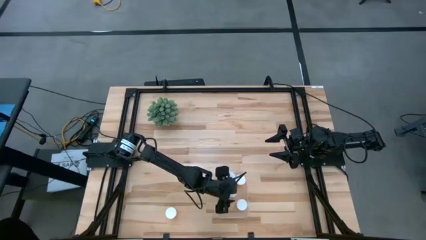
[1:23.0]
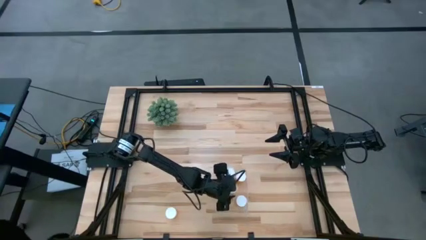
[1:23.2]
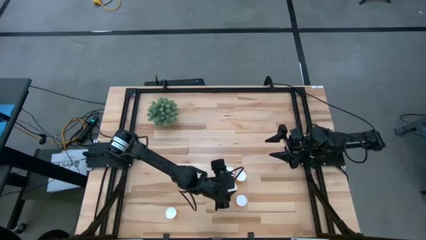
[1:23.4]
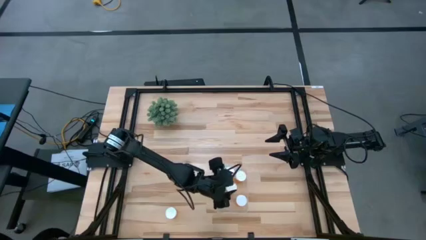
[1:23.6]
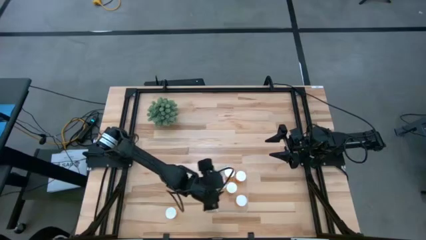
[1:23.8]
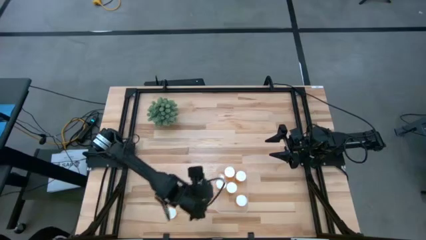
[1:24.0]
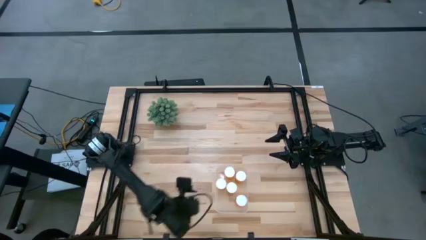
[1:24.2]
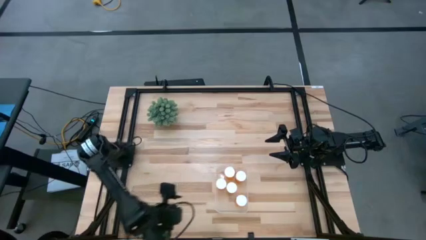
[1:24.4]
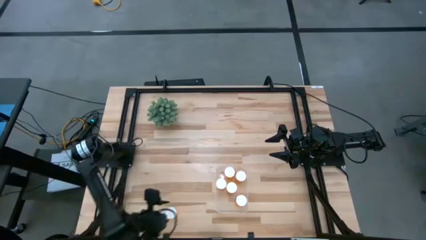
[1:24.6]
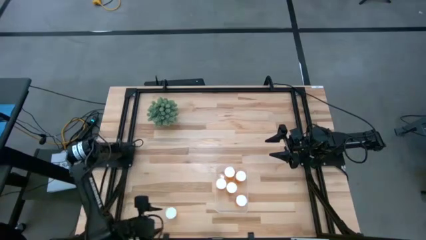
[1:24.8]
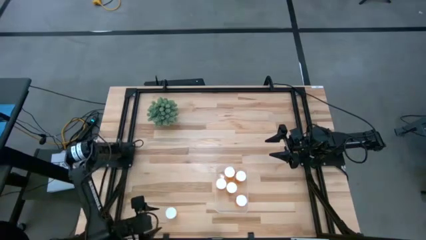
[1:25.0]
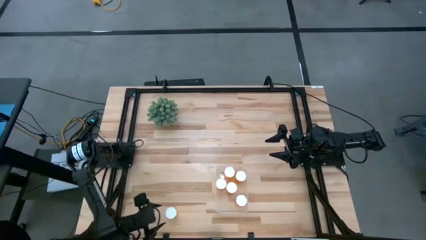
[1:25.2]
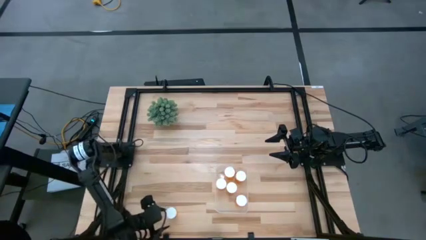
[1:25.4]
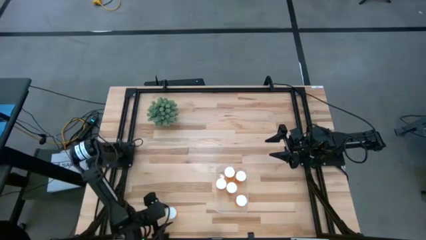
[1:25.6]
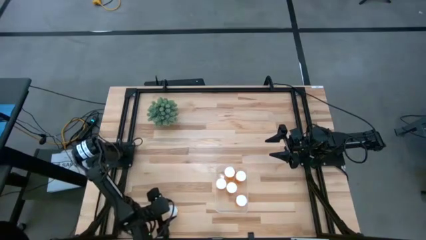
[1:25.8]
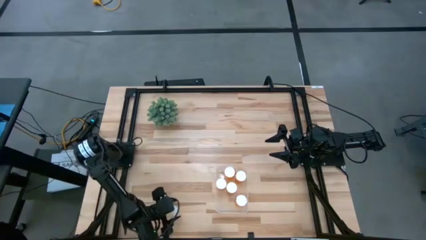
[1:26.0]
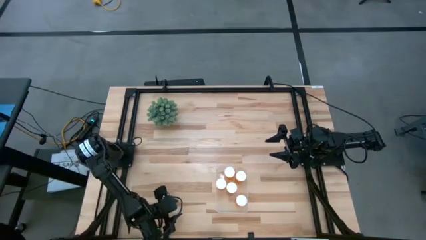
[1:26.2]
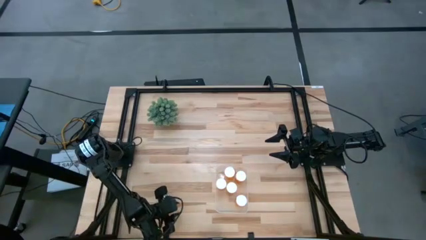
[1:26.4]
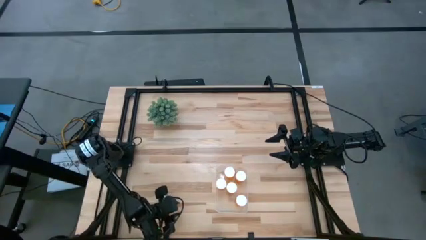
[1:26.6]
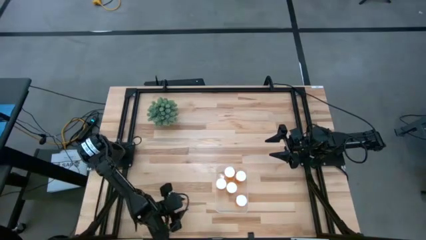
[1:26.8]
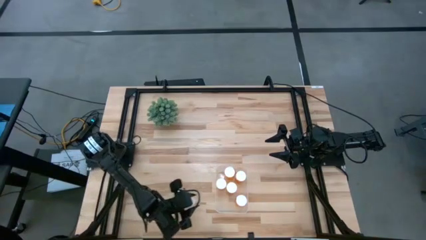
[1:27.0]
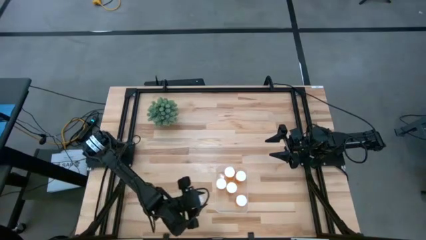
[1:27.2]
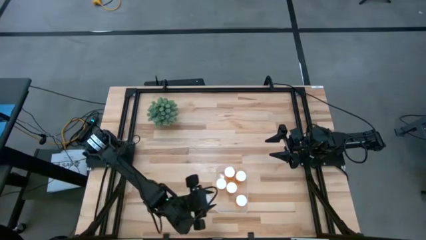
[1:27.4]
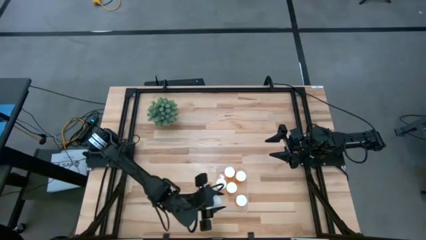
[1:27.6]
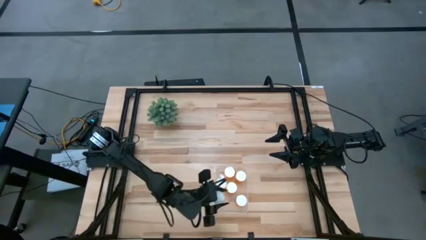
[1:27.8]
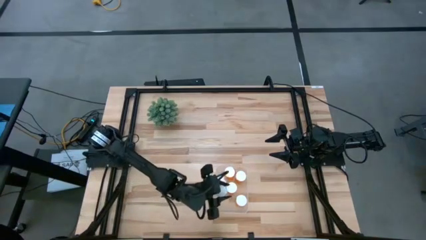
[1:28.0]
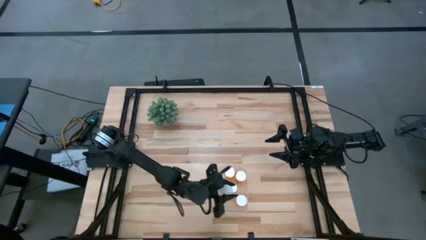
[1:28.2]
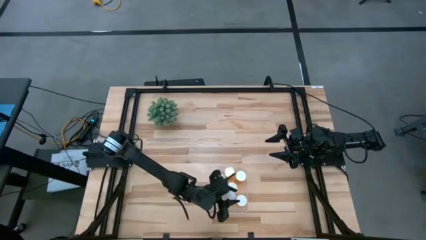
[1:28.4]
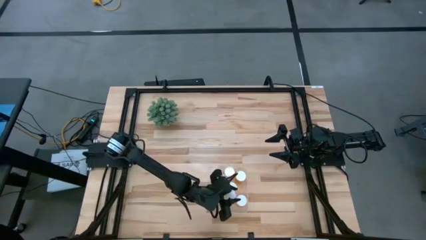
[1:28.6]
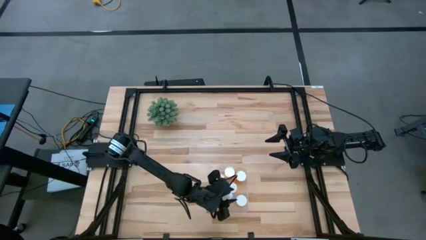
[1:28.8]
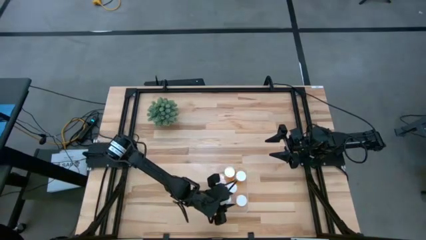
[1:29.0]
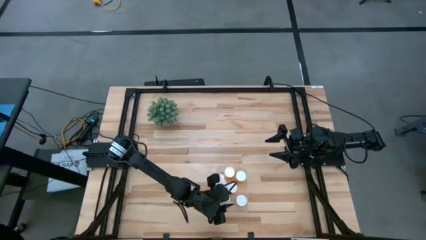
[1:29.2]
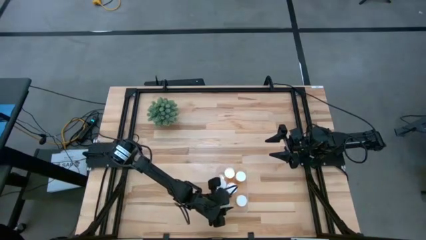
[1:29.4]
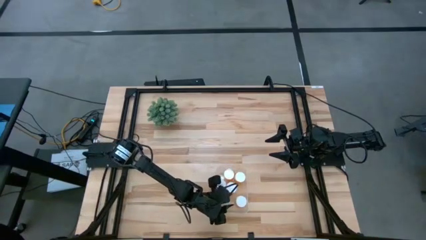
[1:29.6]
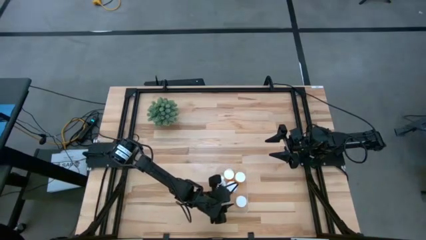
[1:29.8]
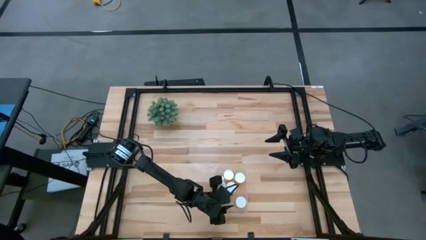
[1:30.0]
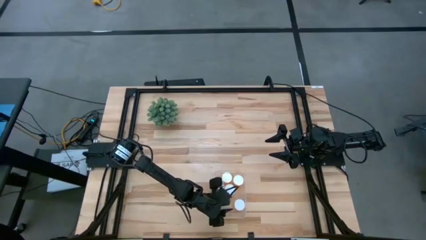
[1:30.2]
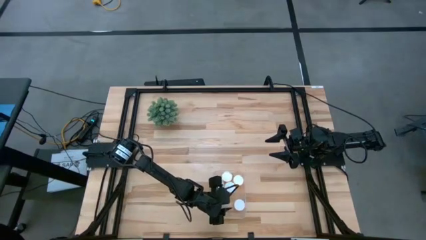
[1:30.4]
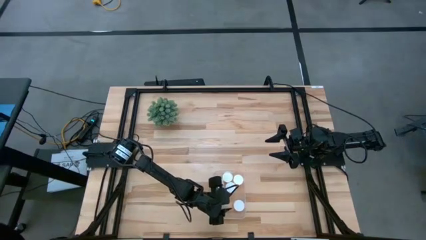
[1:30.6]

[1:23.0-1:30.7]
Task: Pick and place pill bottles into a basket
Put the orange pill bottle into the transparent bin

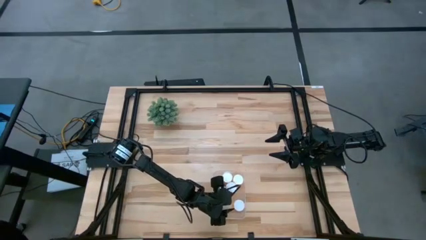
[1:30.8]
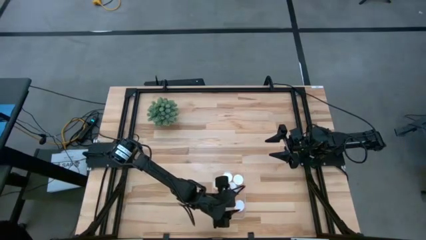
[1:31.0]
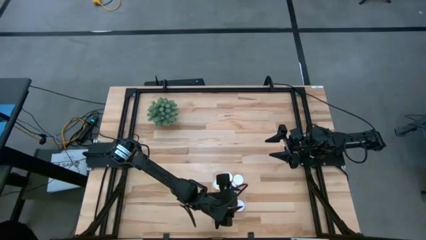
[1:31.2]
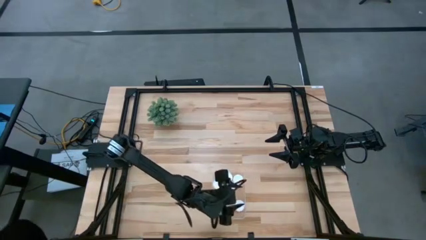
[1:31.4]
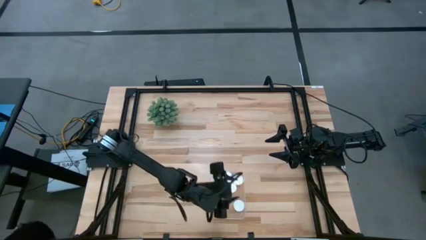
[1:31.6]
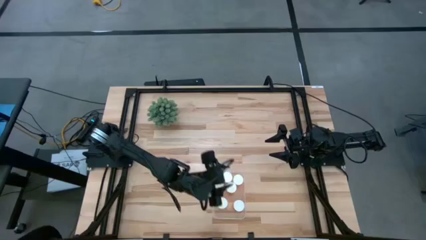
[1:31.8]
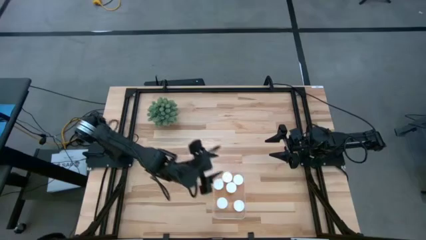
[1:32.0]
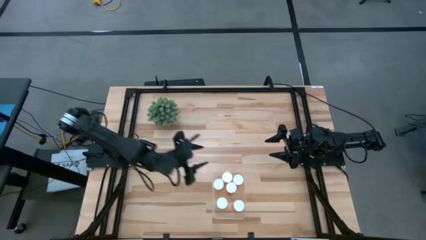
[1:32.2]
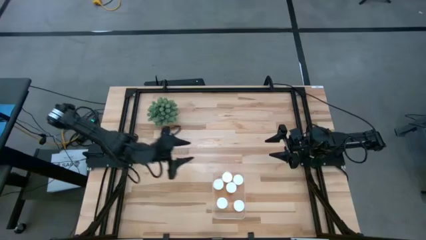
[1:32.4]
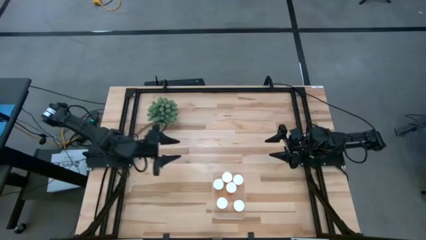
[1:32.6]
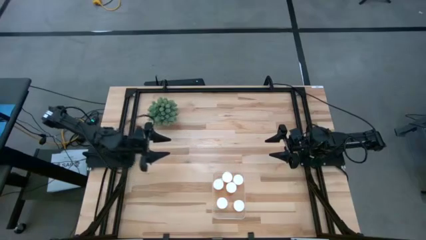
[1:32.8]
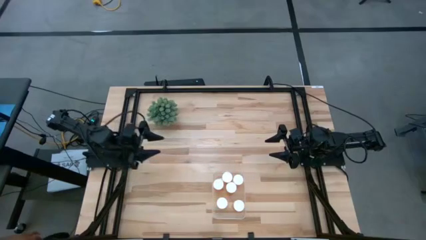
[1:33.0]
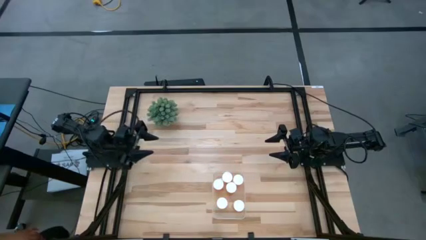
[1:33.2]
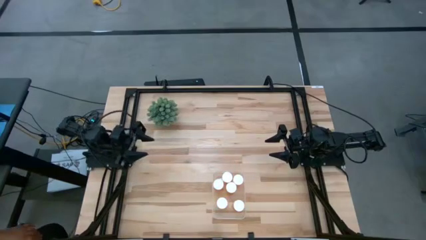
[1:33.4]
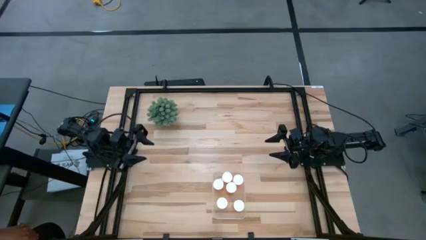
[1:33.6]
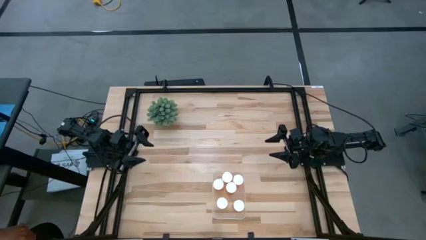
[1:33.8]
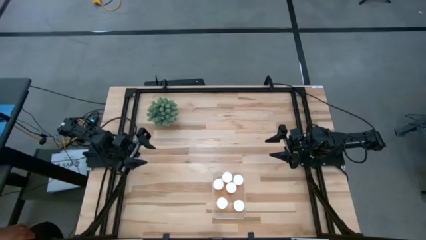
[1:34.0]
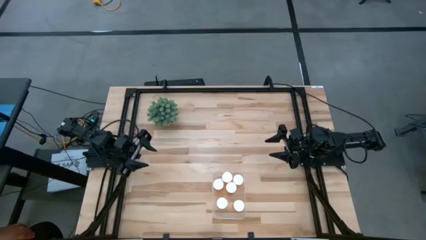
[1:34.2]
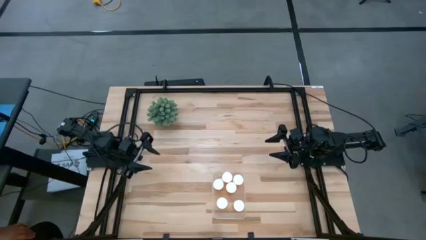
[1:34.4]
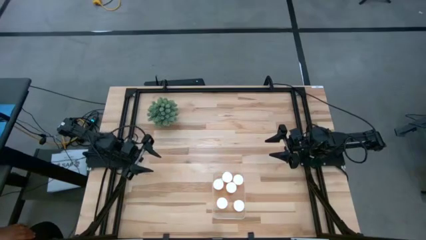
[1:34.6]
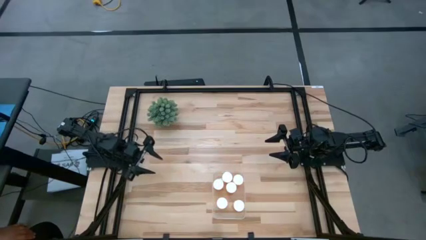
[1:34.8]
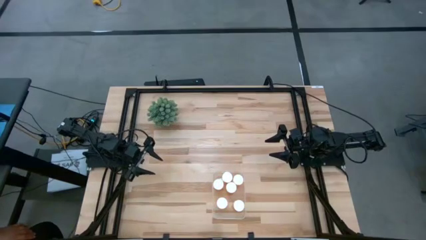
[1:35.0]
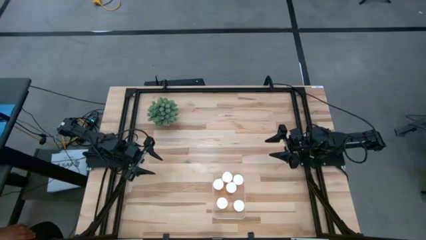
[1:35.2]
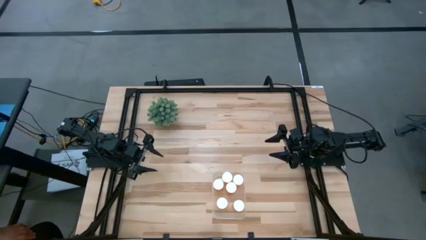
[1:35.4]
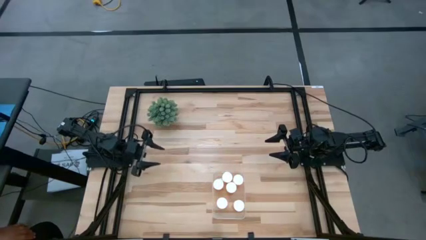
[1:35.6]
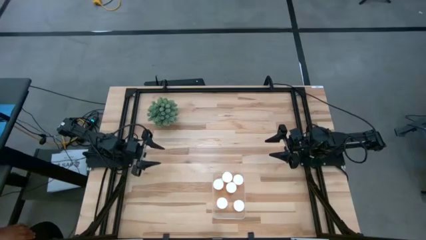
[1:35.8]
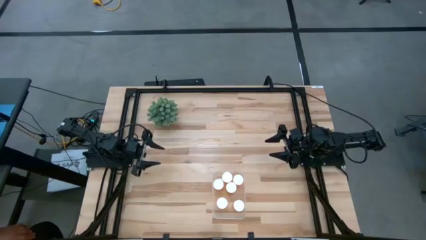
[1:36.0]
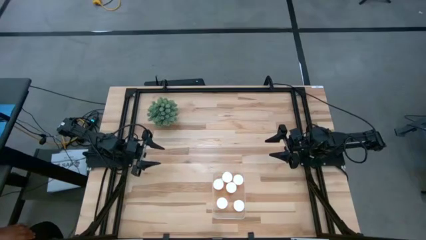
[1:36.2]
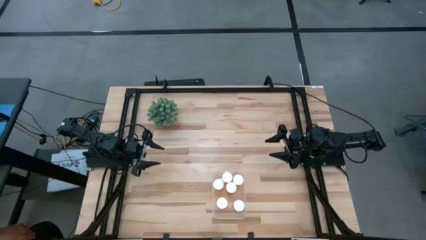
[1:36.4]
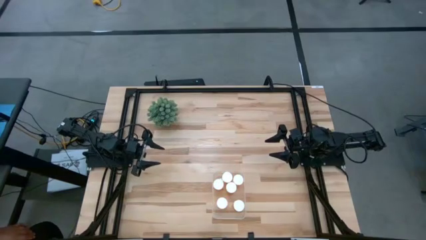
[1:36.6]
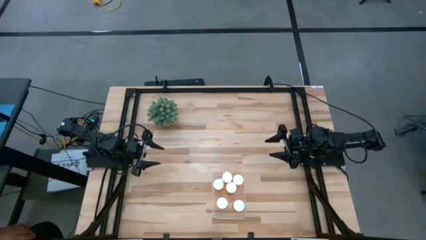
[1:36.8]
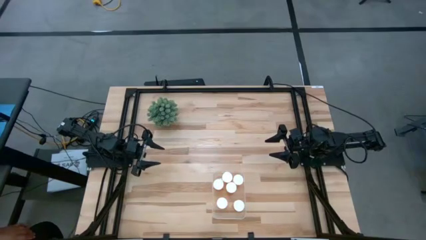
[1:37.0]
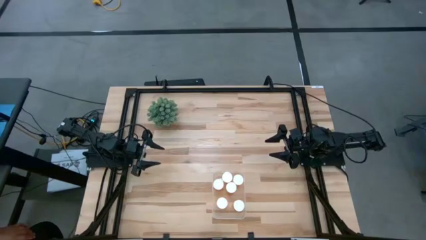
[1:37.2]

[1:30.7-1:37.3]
Return to Home Position

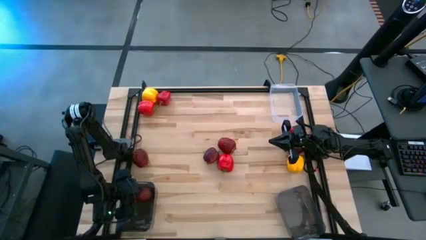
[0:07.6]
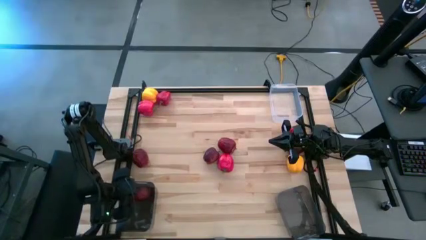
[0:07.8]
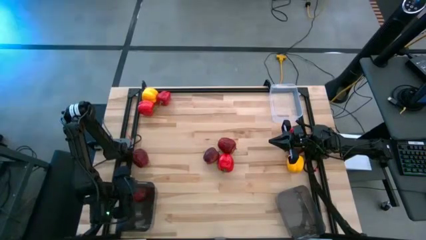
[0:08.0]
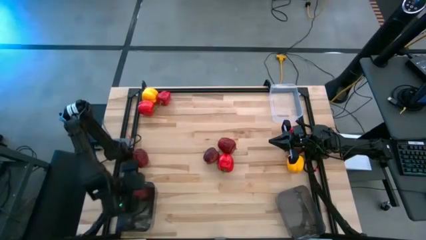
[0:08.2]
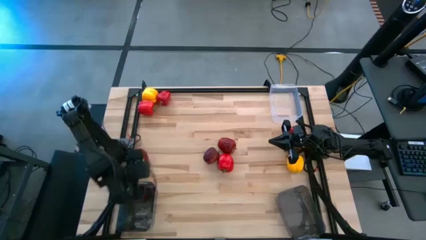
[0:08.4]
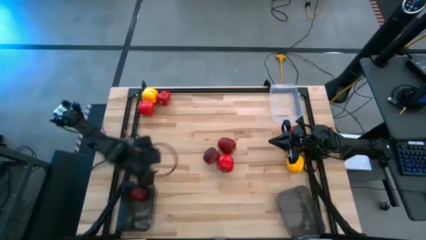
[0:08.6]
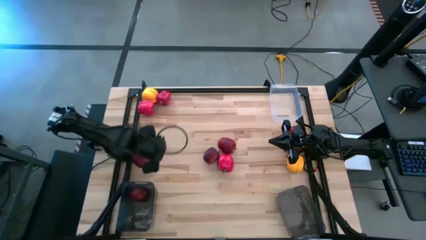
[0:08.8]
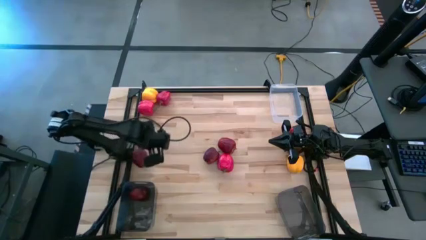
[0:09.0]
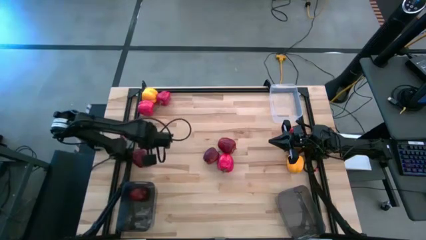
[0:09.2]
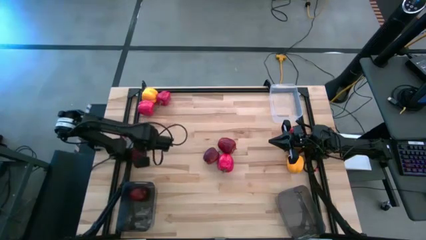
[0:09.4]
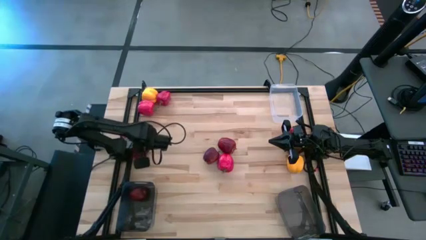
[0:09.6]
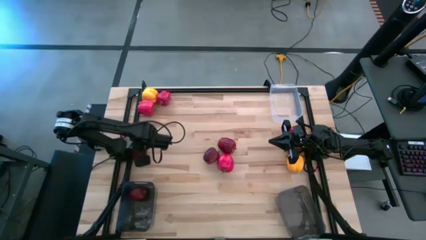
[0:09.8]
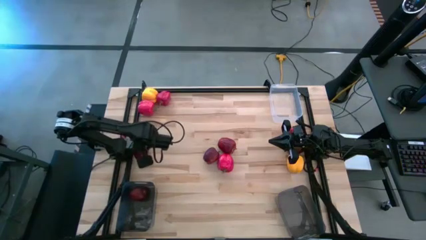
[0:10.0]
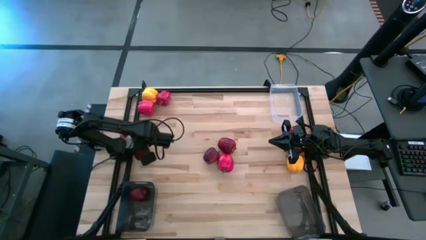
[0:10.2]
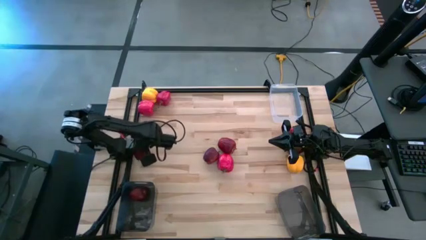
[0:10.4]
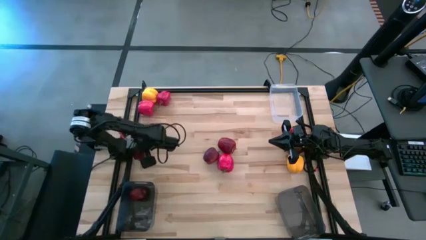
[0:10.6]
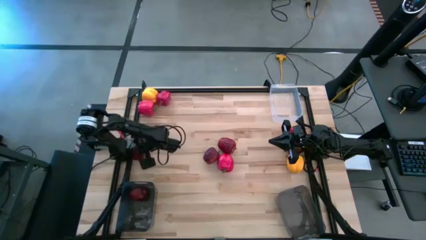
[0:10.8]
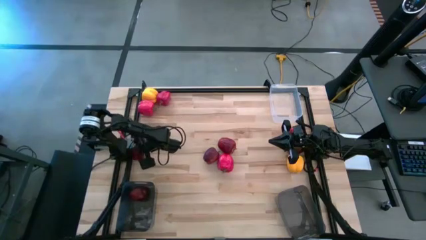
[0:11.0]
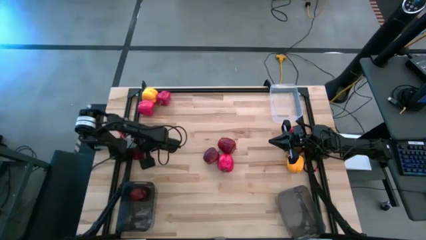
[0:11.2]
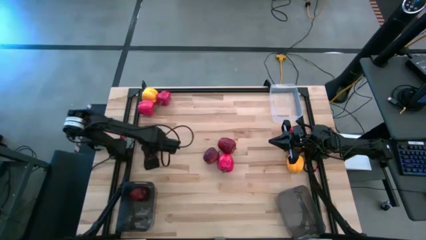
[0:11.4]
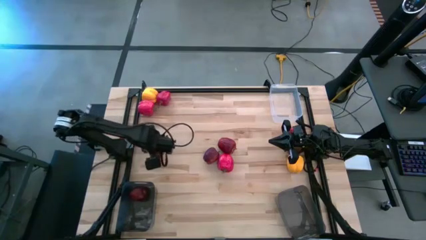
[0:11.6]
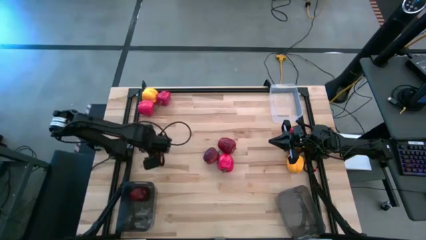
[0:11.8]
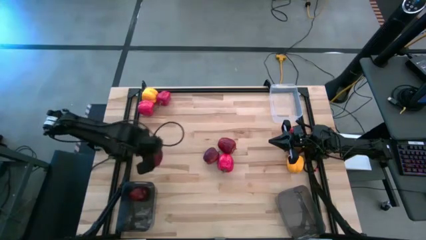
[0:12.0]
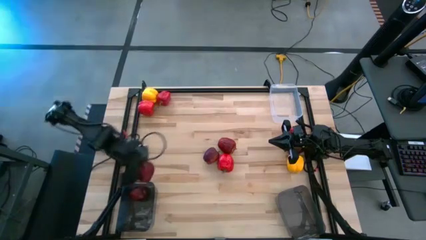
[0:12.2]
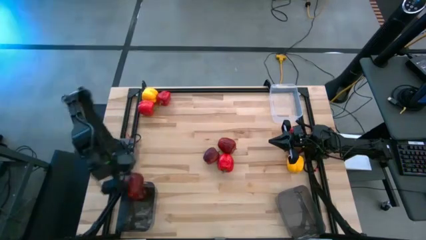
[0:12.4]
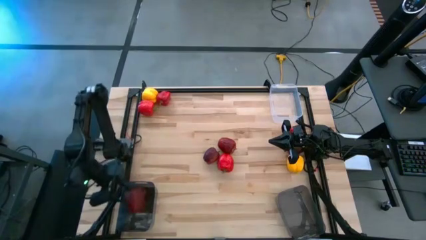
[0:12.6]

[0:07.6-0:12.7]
Task: Sort produce into baskets
Put the dark red apple into the left black bin
